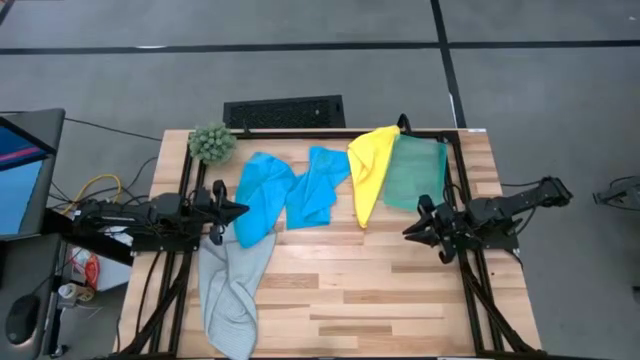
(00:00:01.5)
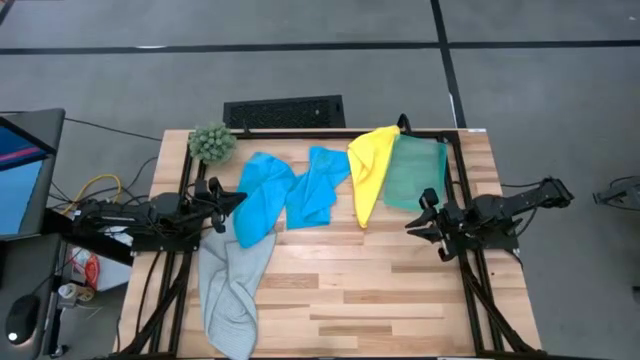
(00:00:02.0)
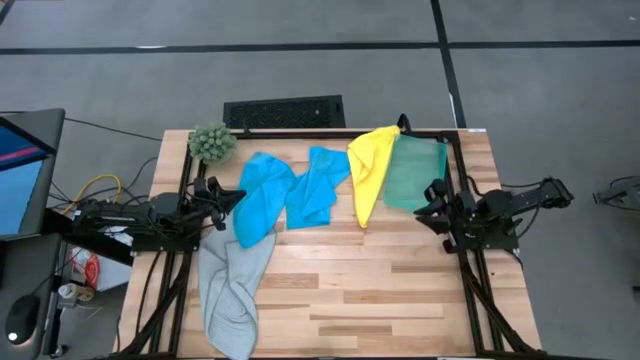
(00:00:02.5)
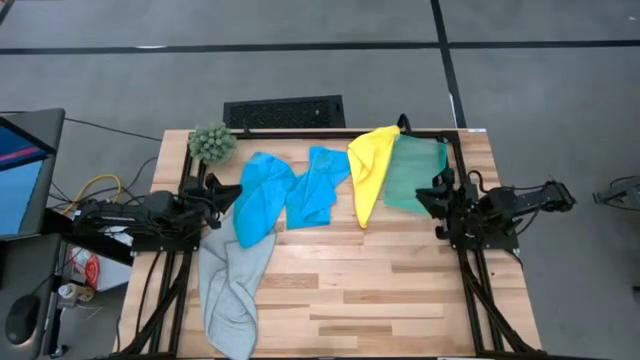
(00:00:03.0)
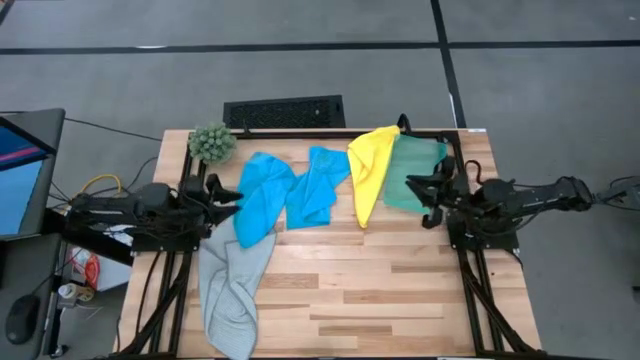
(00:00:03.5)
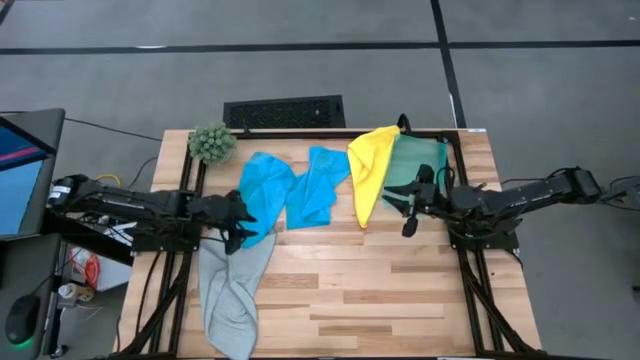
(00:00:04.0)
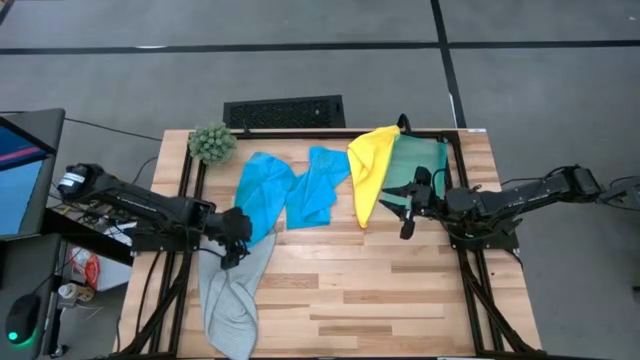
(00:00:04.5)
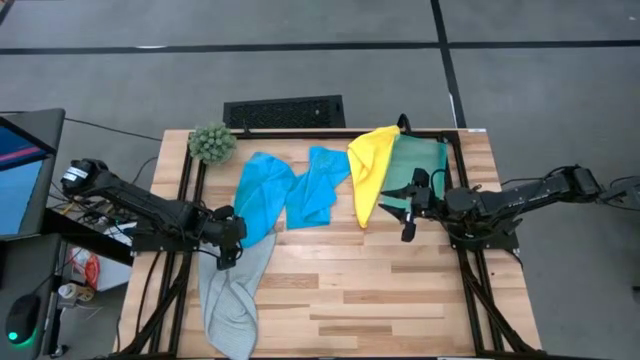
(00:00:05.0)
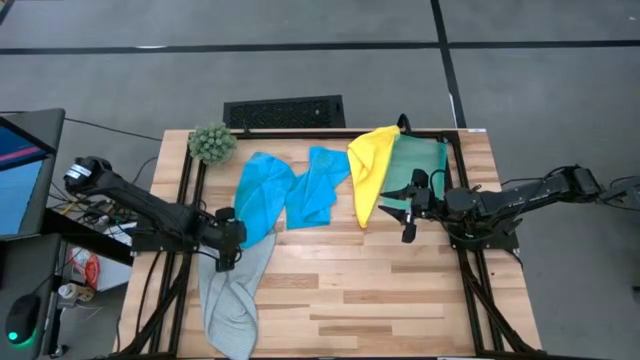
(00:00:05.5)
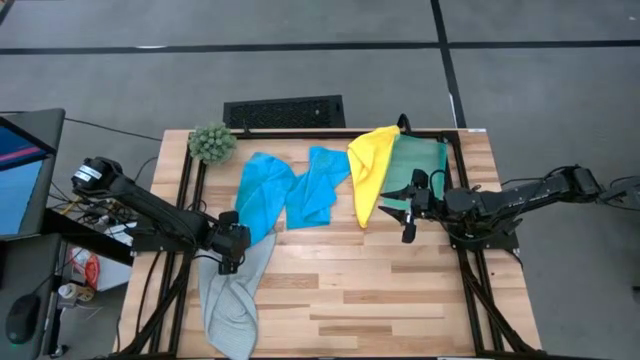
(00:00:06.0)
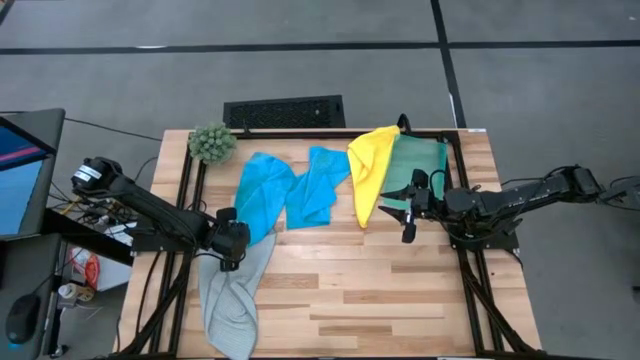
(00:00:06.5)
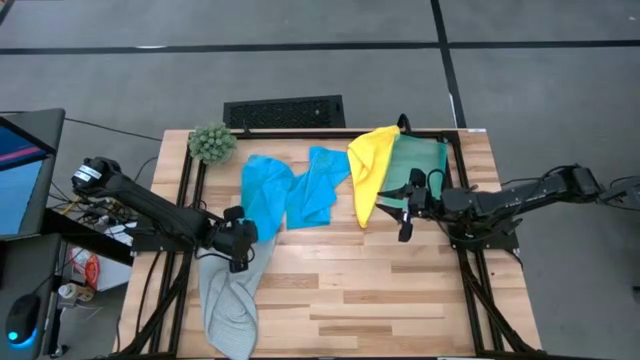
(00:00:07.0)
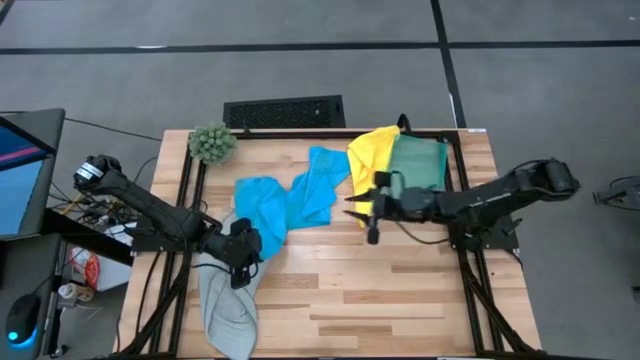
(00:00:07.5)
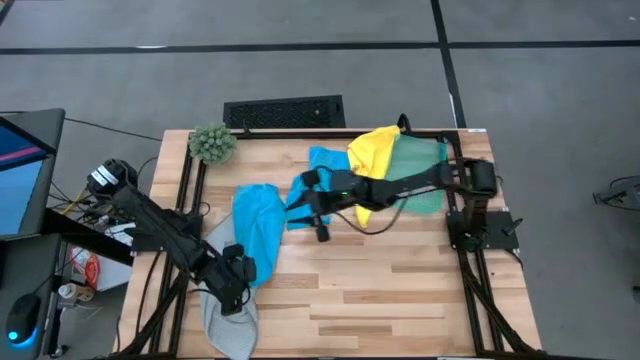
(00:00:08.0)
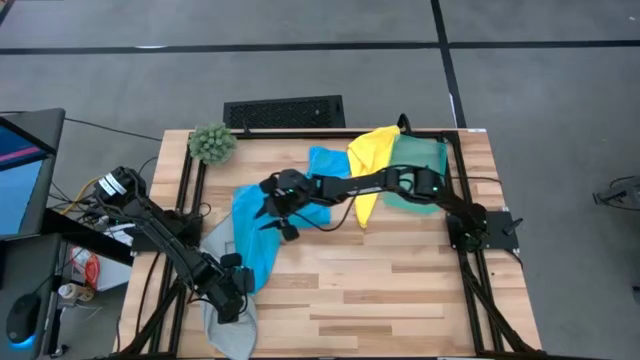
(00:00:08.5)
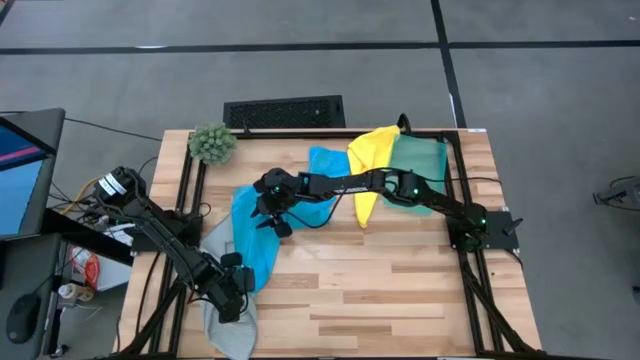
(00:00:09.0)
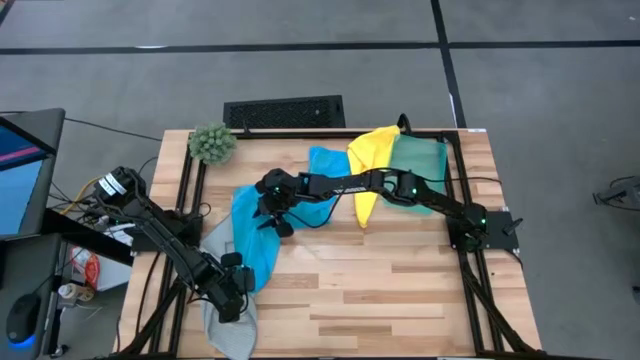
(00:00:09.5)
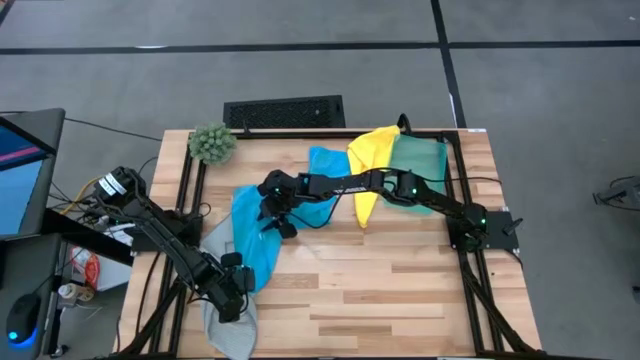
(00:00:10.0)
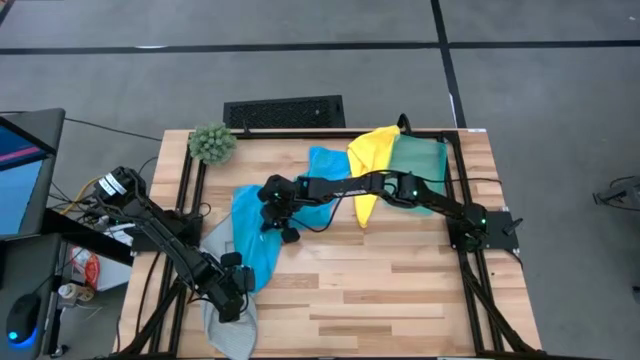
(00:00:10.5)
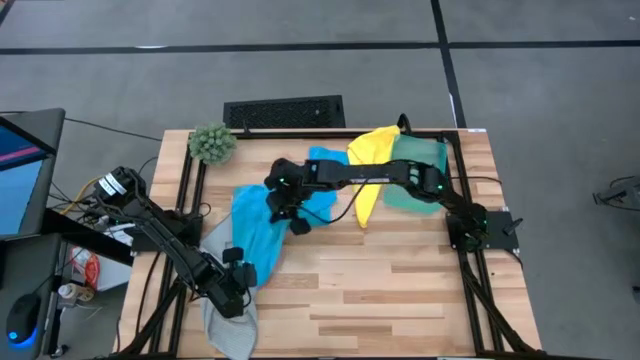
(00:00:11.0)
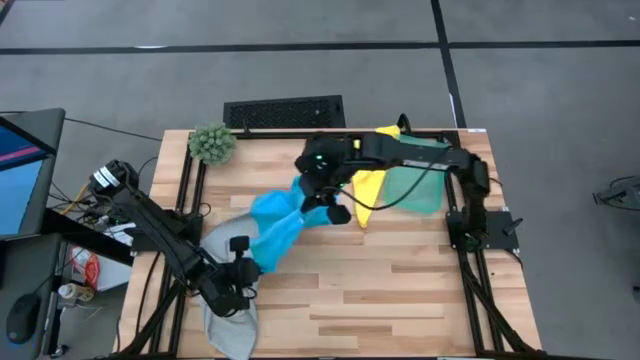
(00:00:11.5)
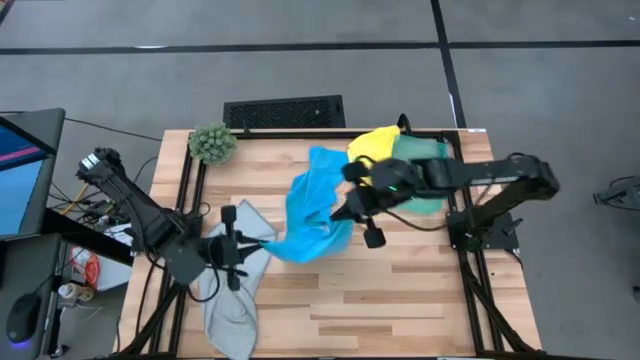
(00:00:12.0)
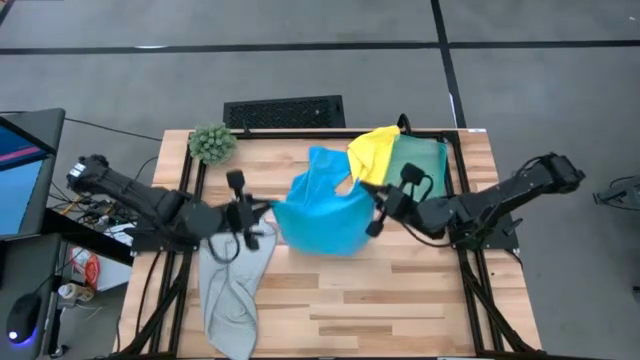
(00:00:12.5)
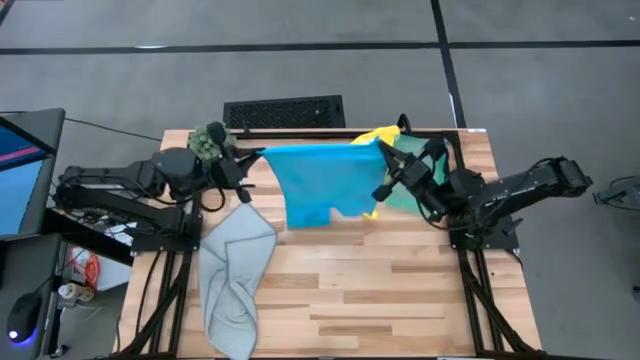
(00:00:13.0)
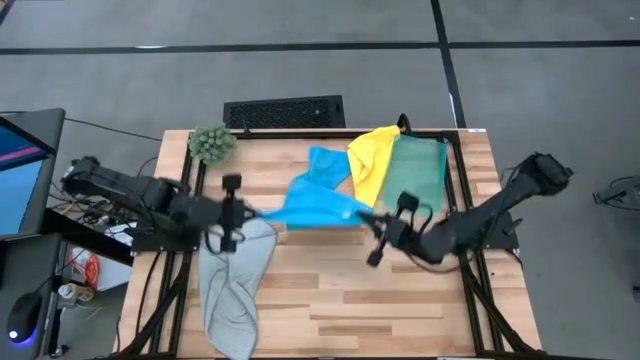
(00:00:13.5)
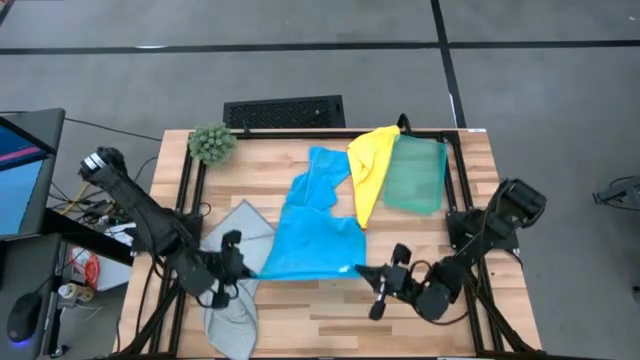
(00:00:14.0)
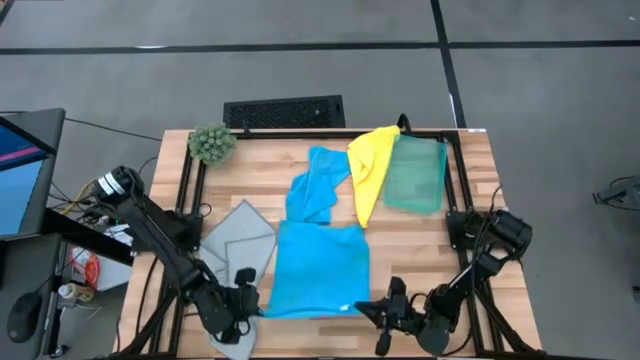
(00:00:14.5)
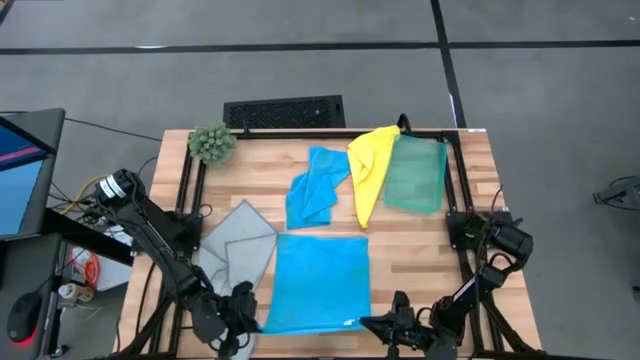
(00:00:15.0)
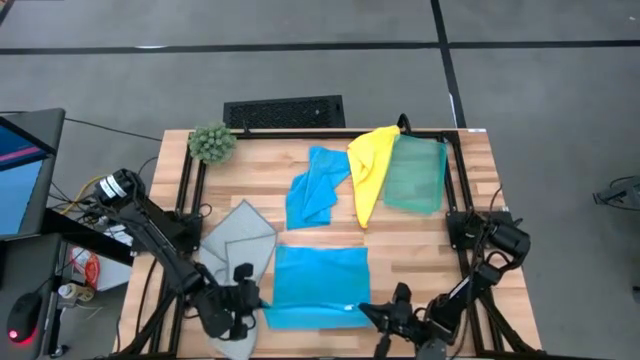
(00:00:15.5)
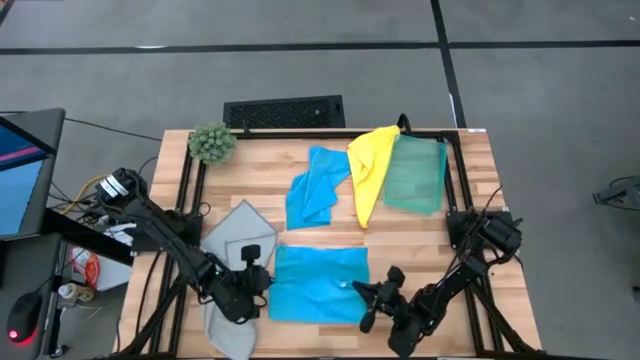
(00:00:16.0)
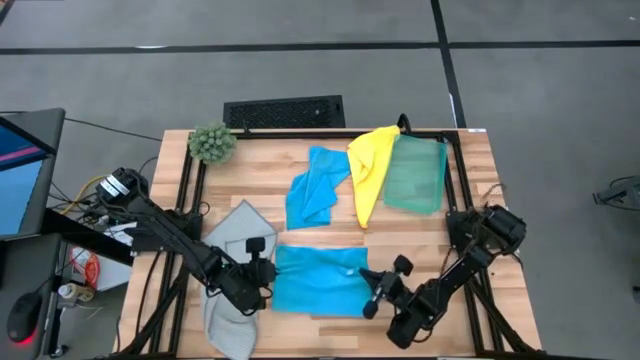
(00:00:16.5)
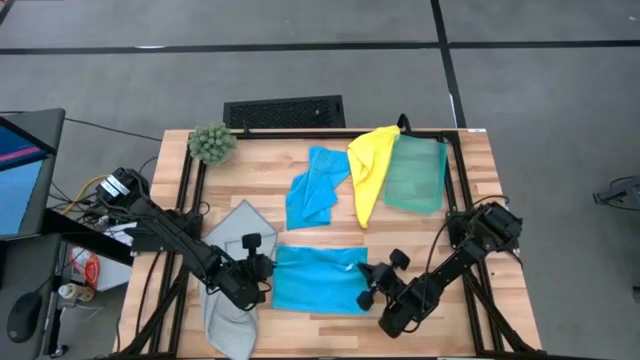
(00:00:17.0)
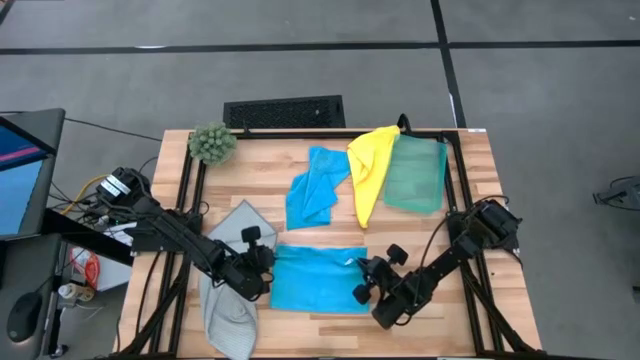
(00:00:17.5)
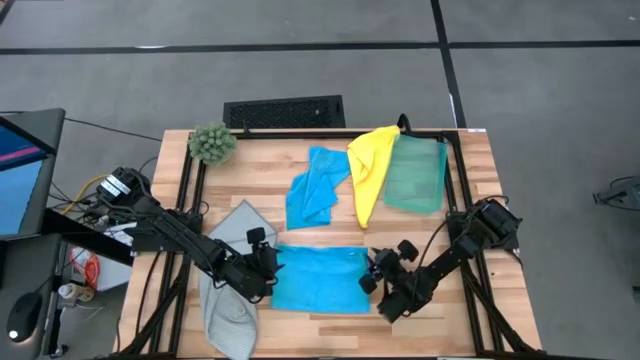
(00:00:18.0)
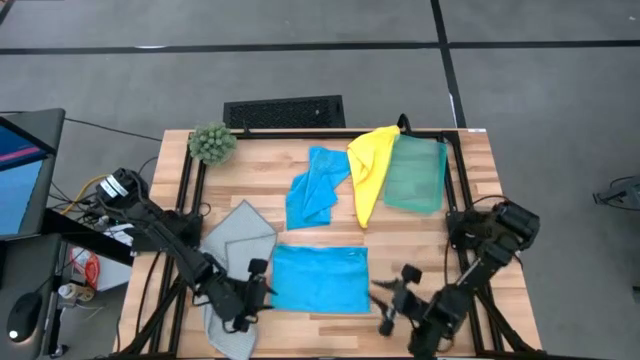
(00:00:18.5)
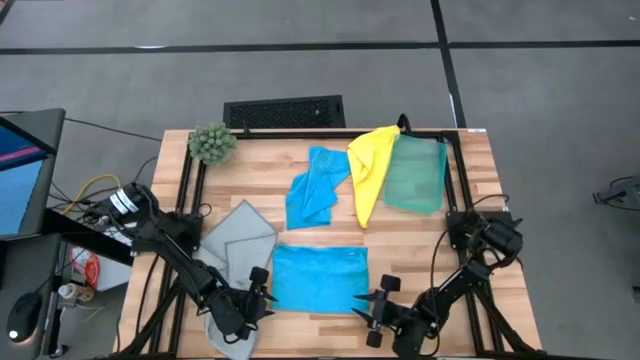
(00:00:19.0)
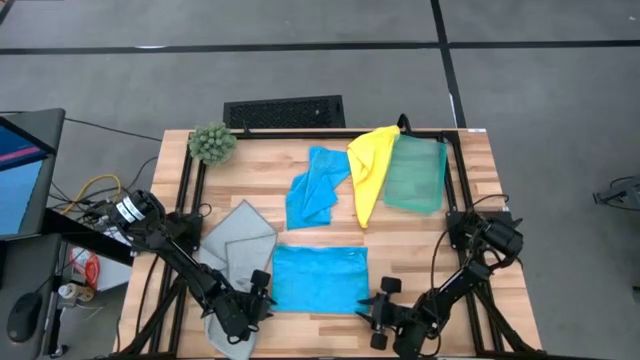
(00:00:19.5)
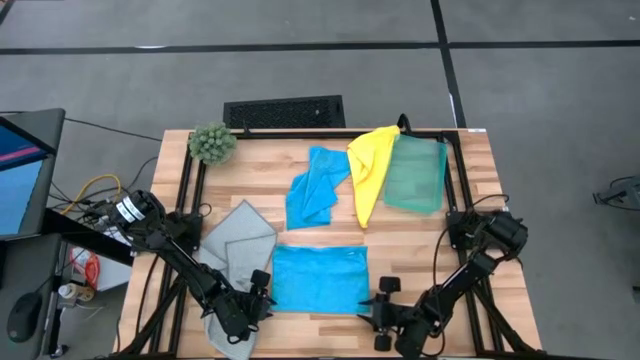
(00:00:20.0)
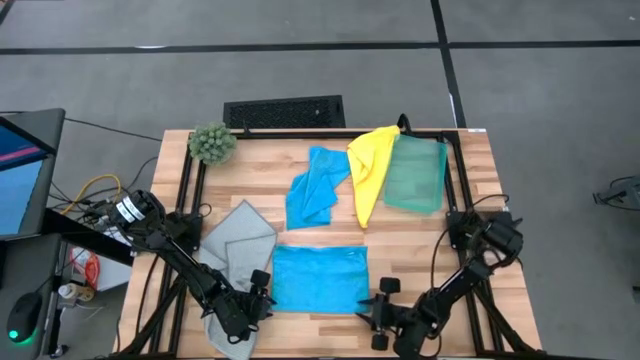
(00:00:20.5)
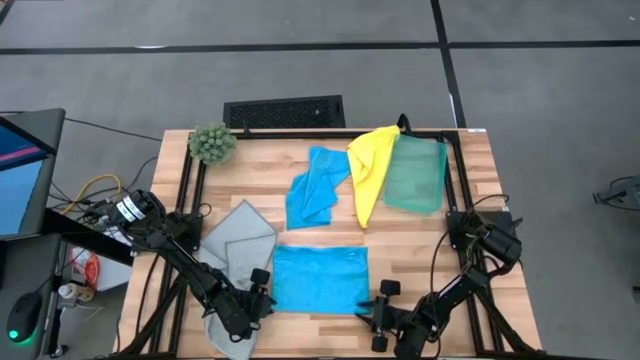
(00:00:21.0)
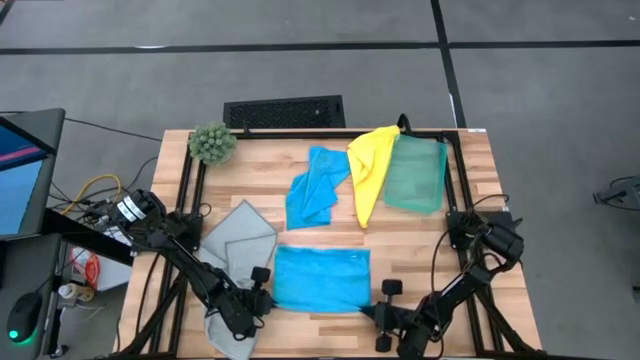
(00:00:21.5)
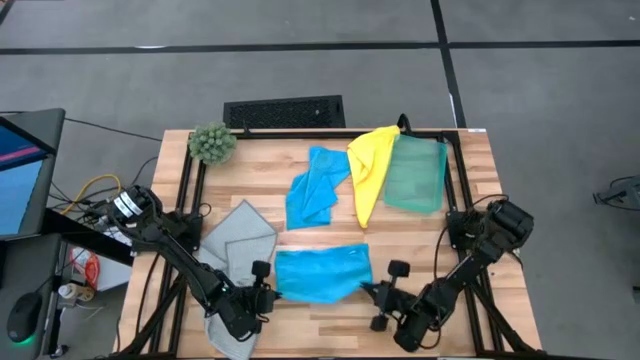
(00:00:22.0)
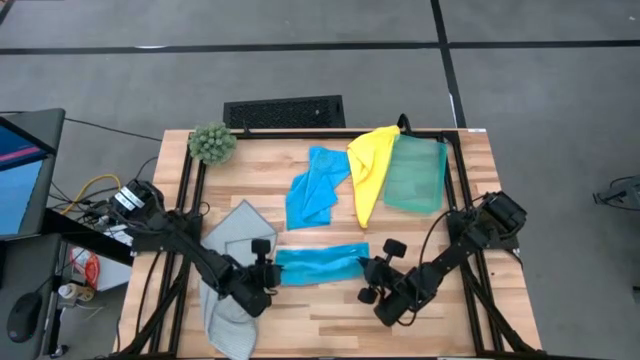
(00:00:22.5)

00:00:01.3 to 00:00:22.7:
Task: Fold microfiber towels
Fold the blue microfiber cloth
